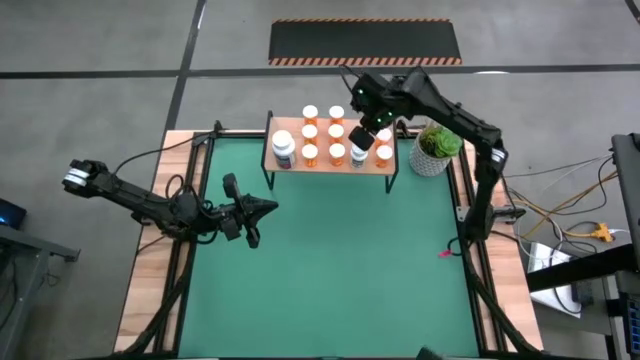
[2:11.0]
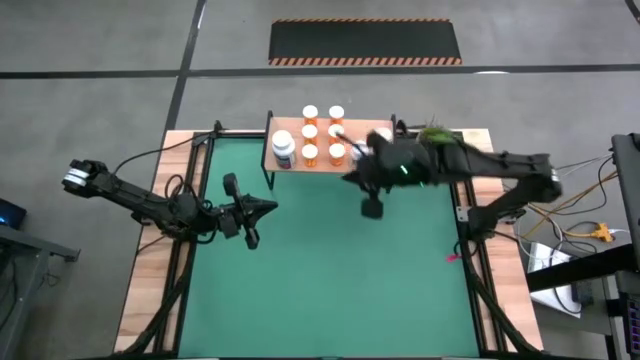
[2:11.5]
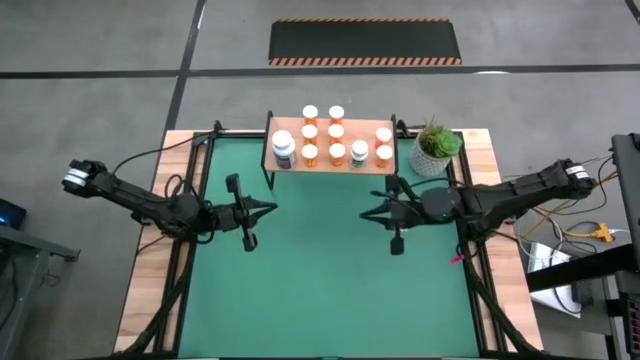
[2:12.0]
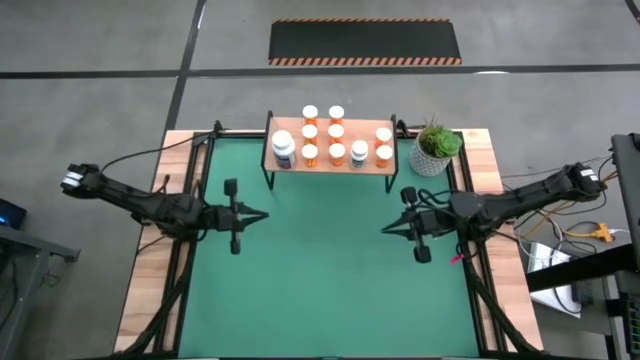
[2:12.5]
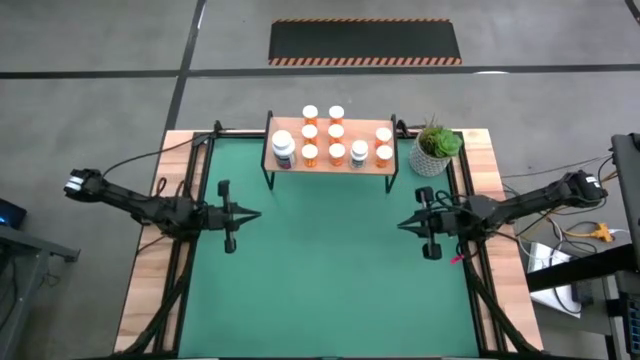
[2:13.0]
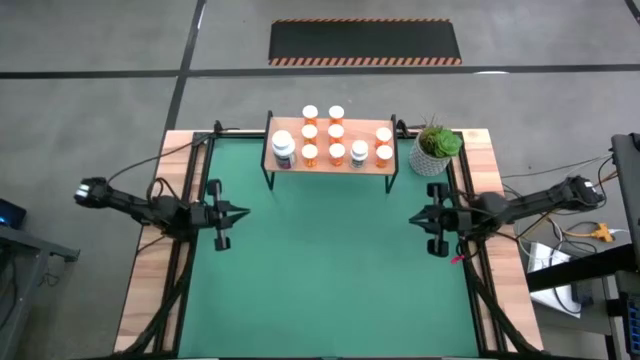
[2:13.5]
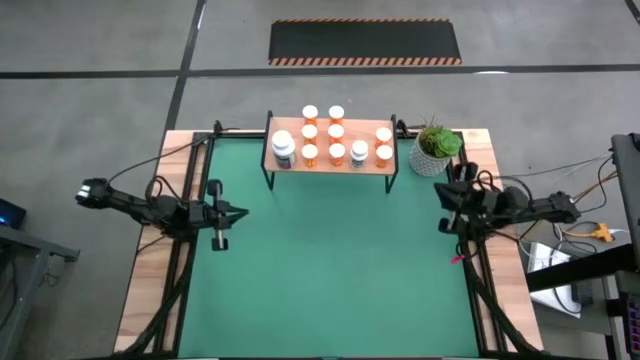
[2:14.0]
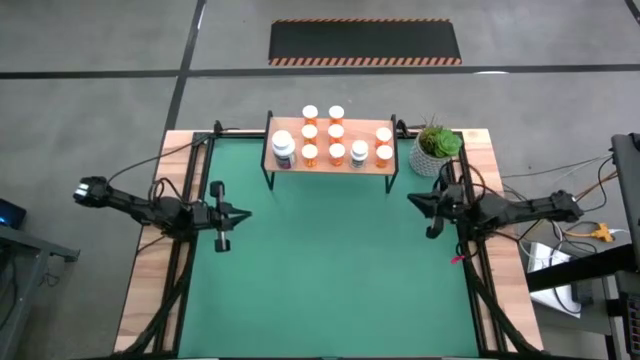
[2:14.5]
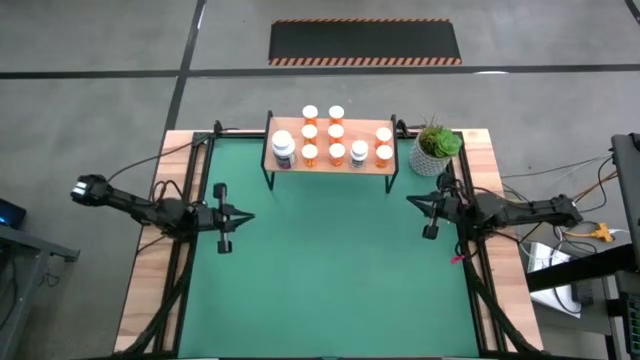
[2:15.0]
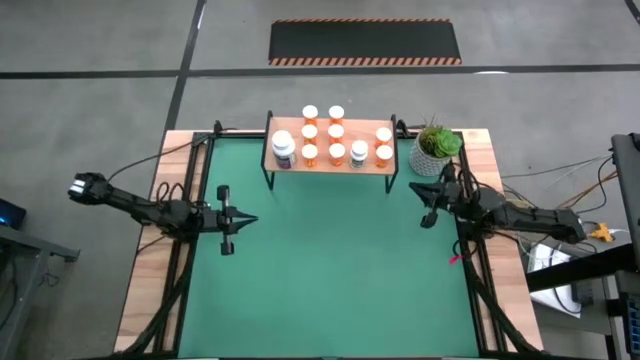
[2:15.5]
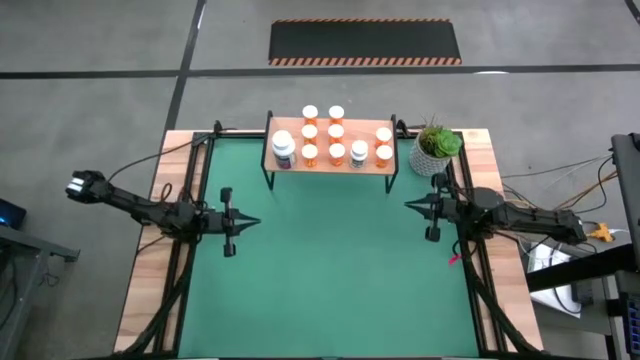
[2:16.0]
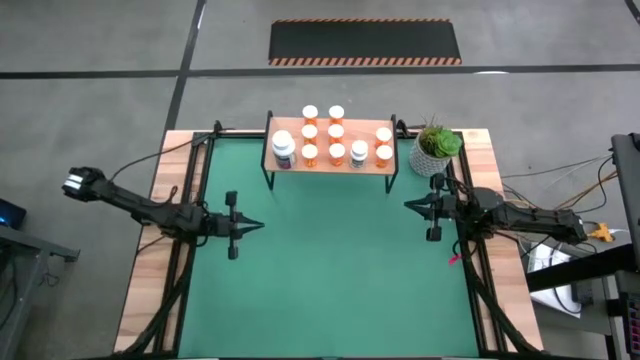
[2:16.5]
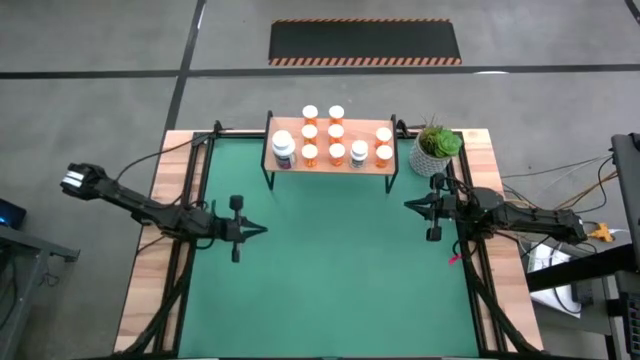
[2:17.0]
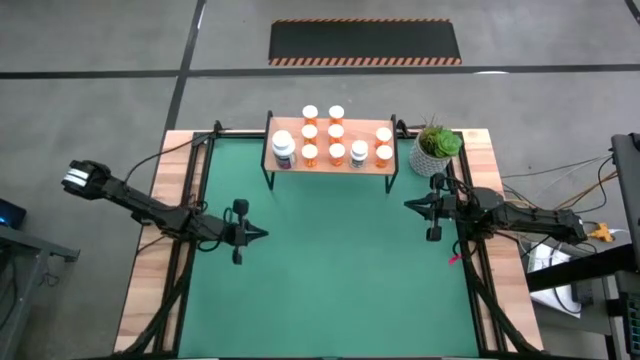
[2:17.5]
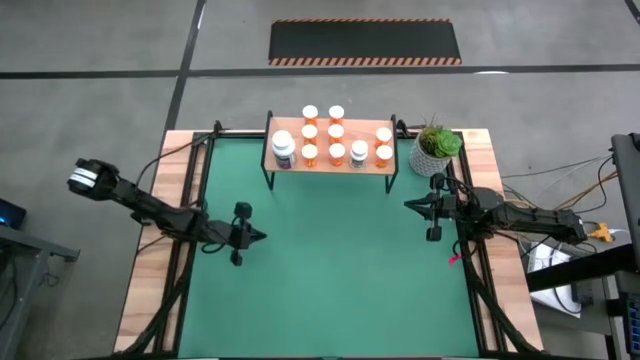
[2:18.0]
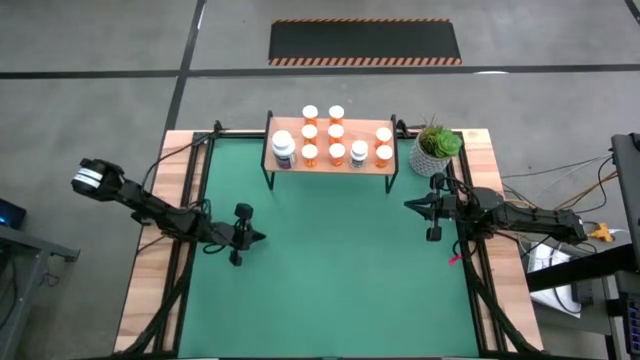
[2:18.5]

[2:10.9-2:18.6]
Task: Pick and place medicine bottles onto shelf by color
Return to Home Position

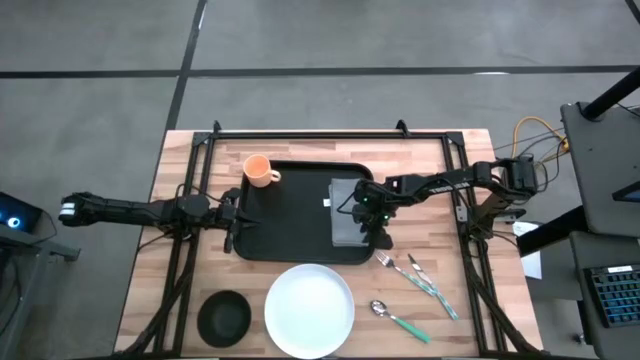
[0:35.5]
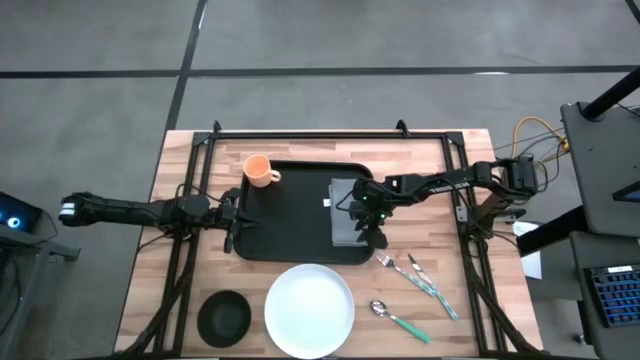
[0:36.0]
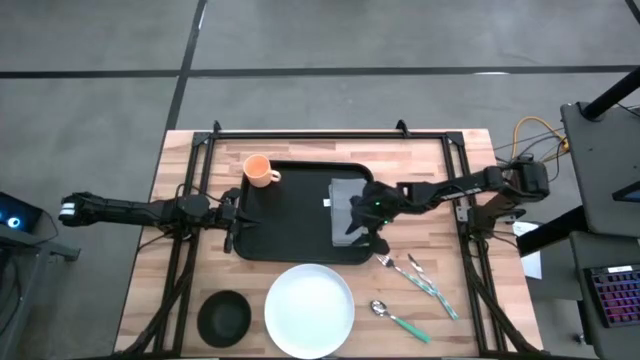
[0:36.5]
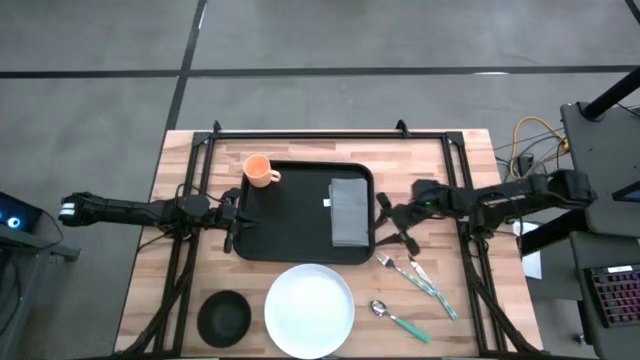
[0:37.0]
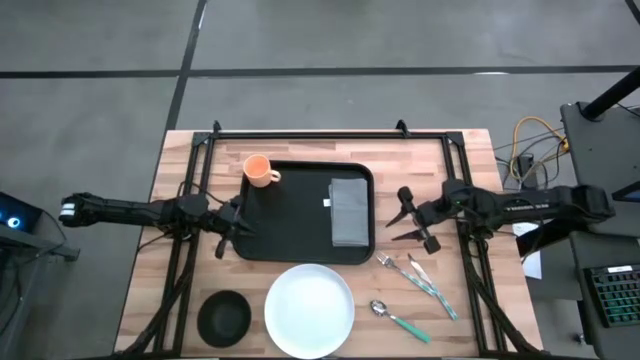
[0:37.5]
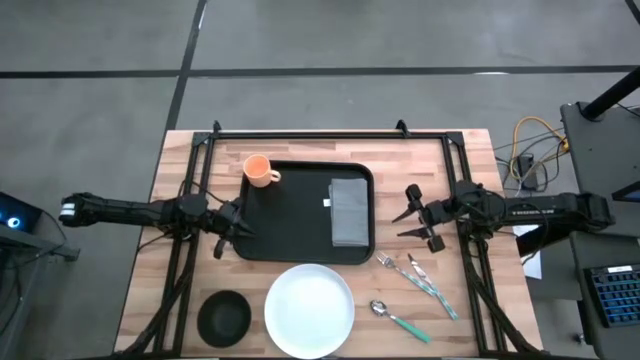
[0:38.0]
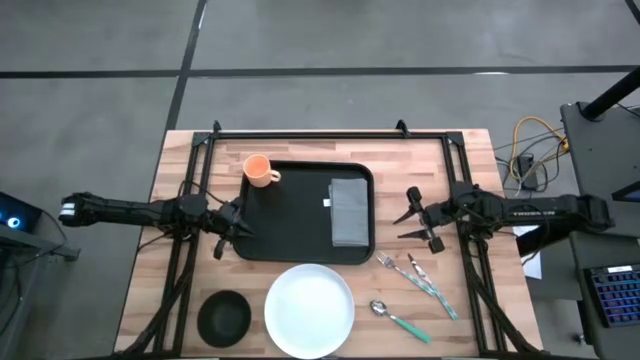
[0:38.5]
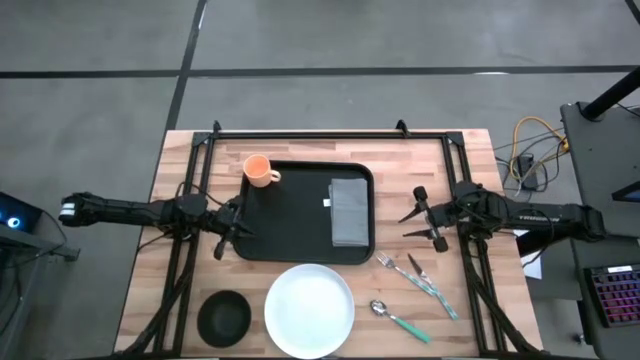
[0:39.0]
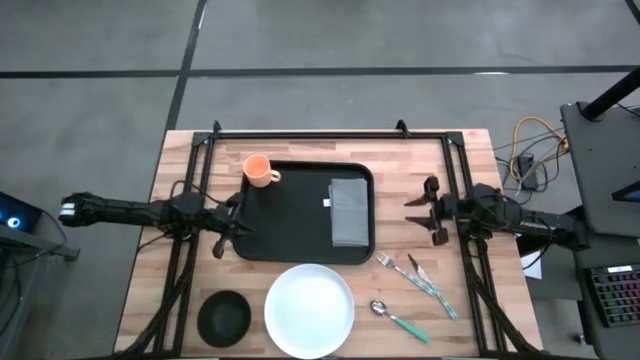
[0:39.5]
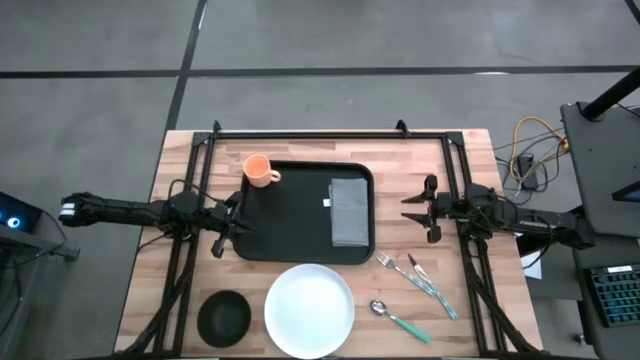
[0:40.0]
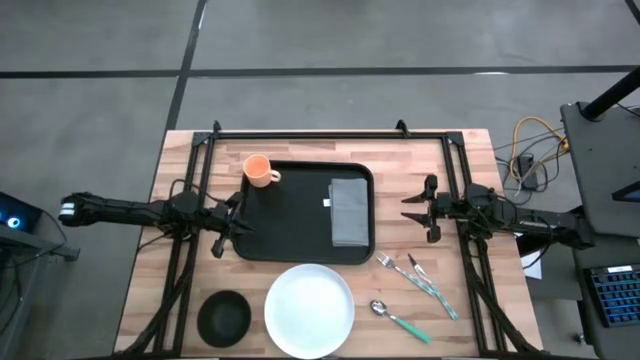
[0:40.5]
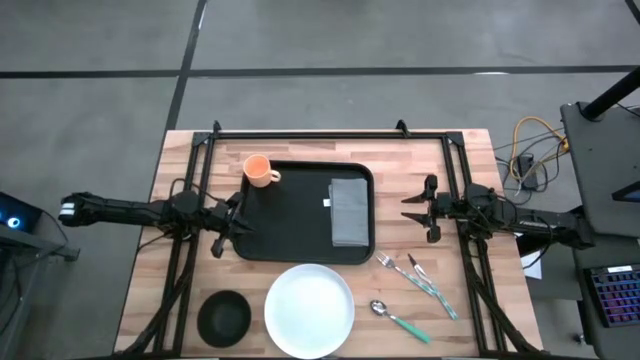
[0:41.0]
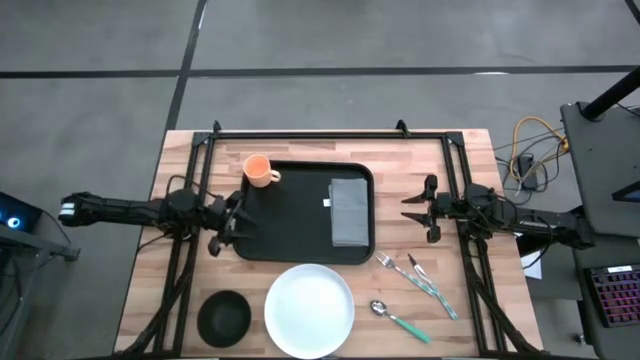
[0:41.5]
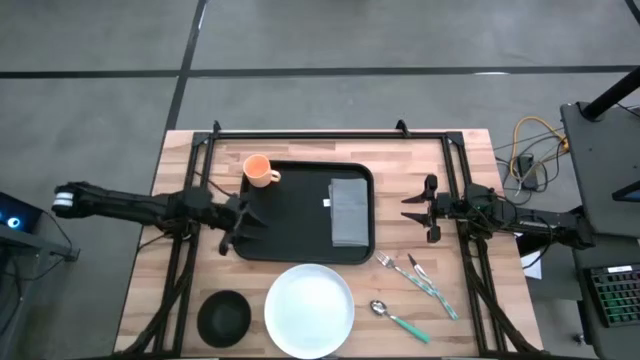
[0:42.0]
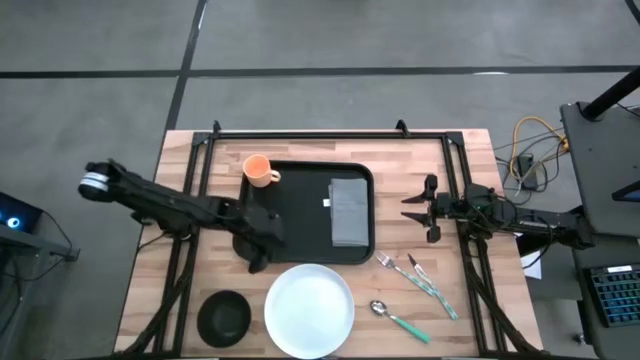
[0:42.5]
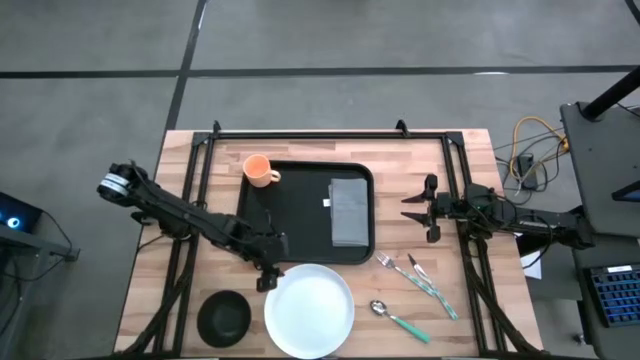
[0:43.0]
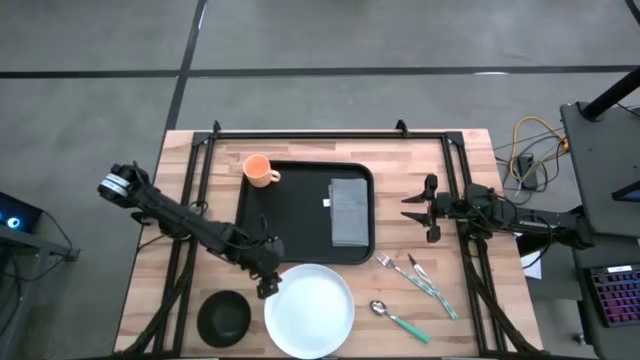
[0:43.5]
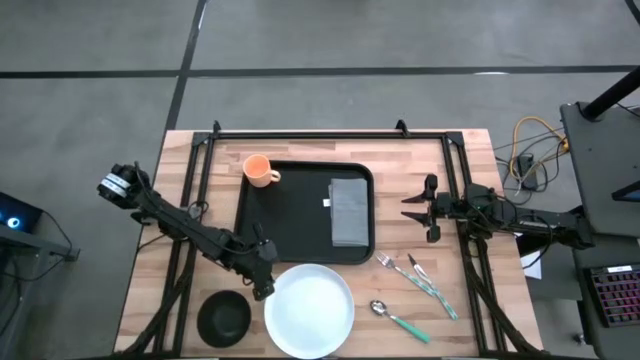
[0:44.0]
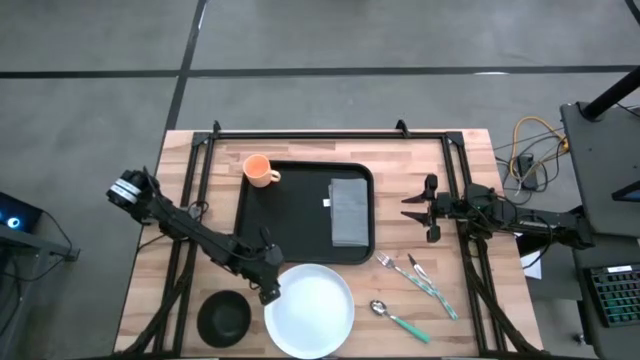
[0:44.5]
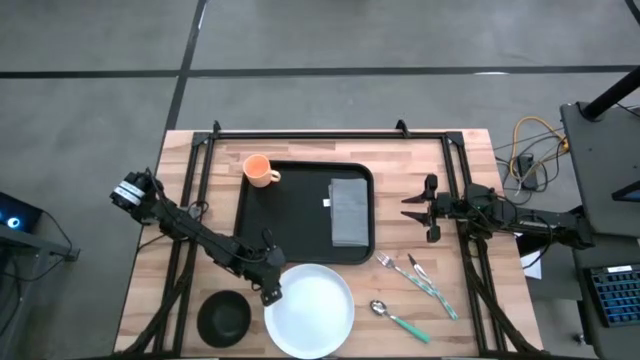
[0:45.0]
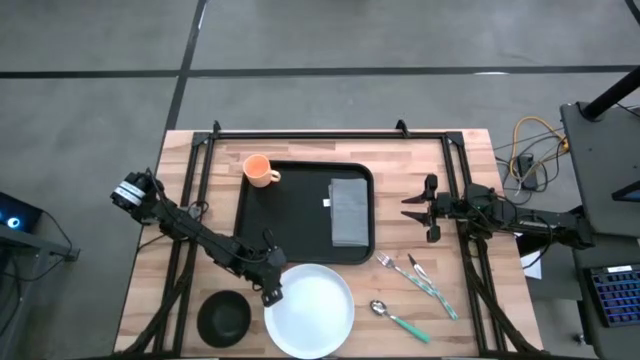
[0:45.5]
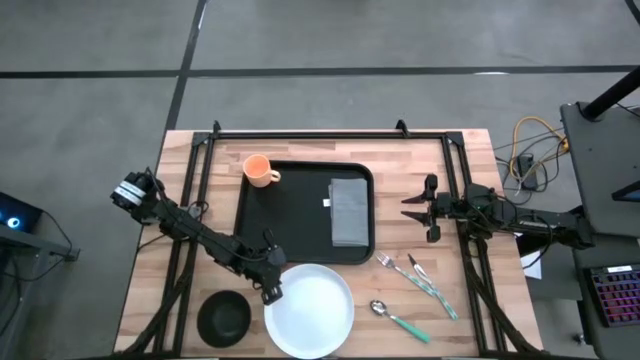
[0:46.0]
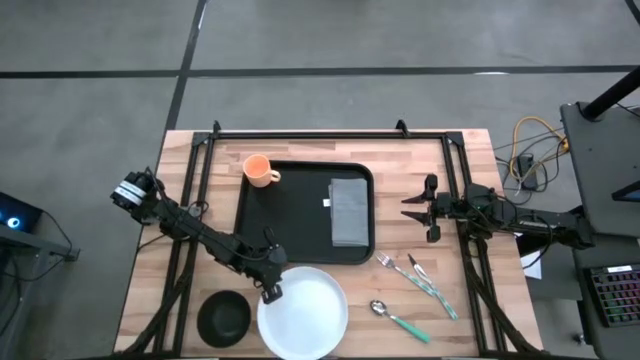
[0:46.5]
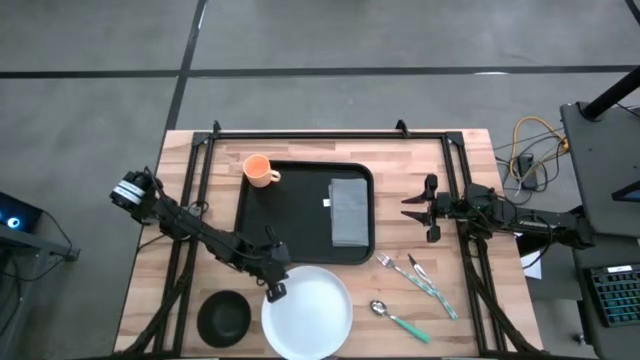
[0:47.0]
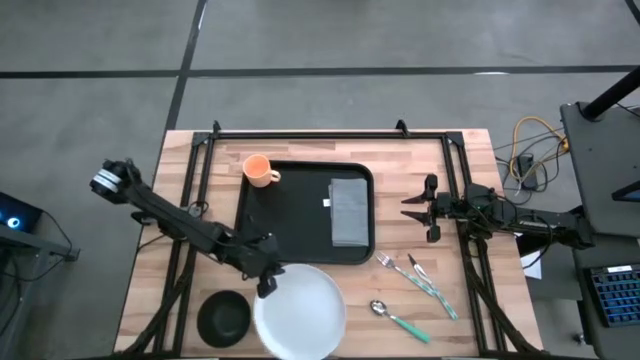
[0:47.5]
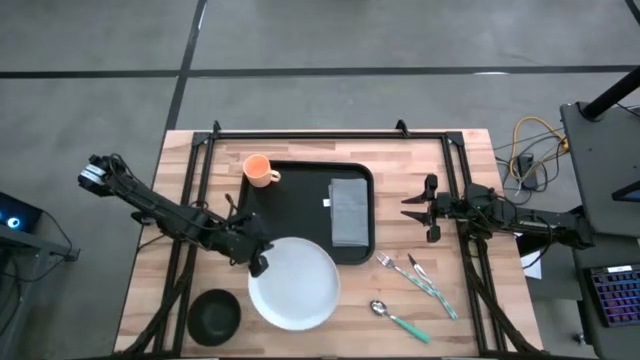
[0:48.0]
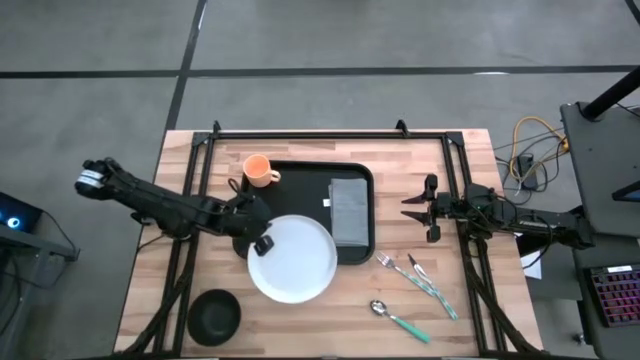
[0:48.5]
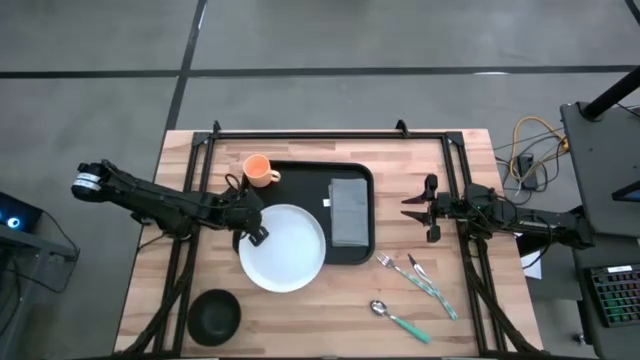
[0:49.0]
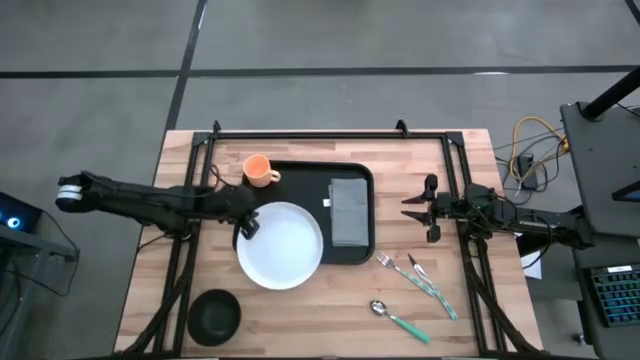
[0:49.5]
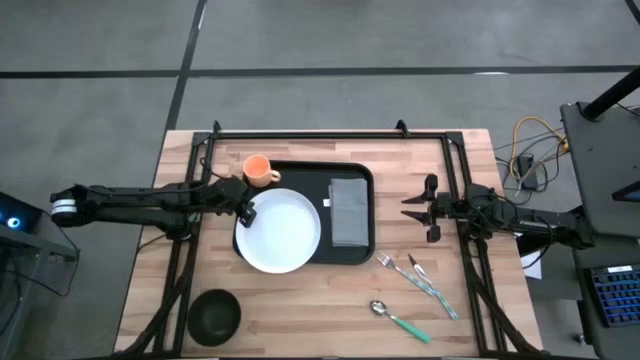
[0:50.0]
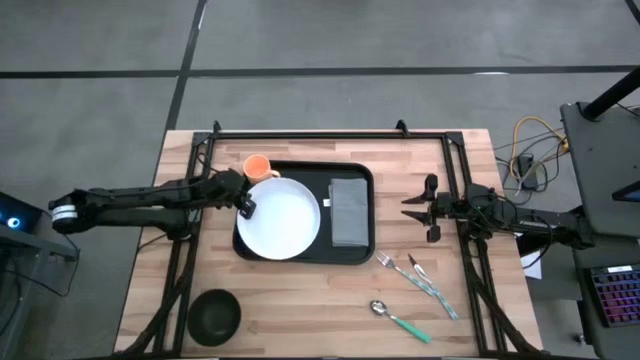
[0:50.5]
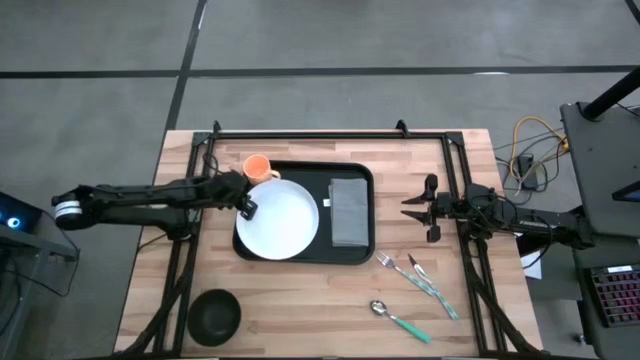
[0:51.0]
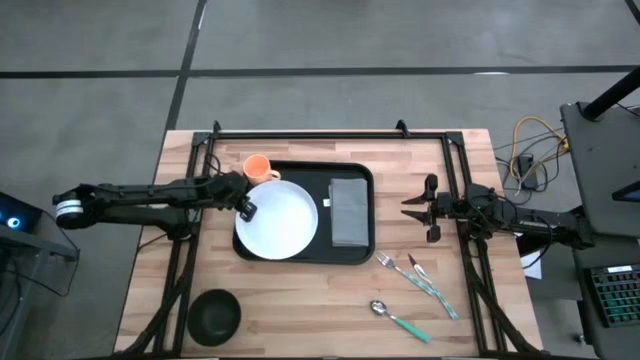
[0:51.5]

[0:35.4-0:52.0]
Task: Set up tray
Put the white plate on the black tray below the yellow mug
